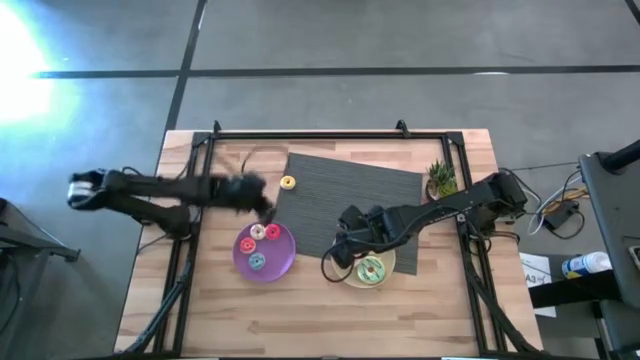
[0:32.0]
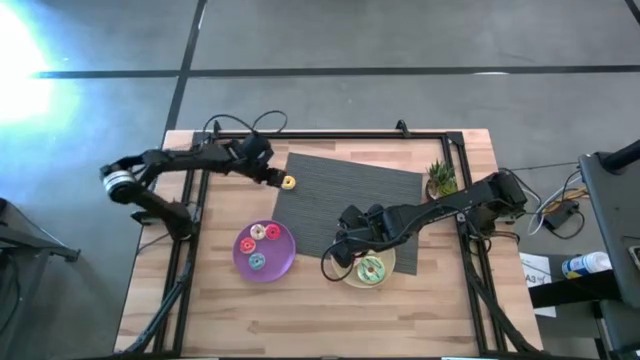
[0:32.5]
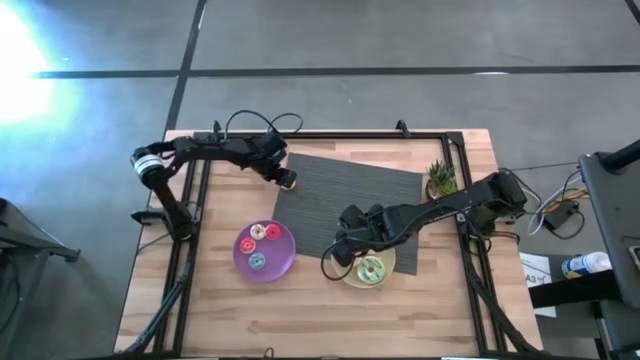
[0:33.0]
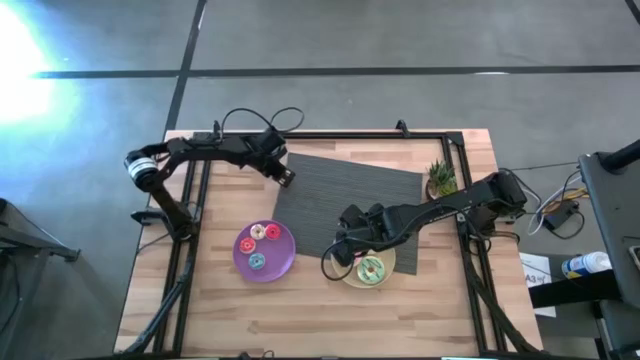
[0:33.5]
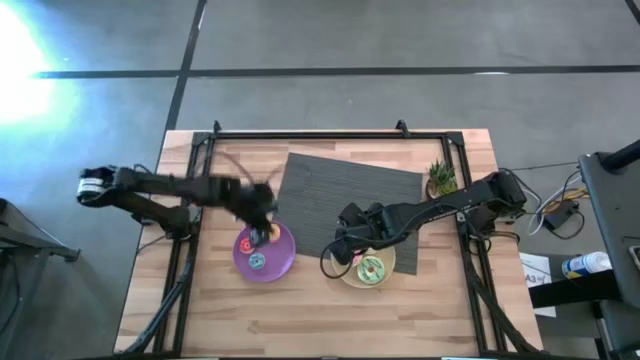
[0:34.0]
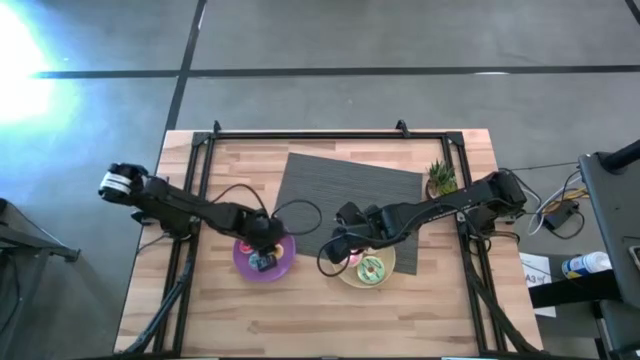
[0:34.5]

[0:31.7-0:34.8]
Task: Pick & Place donuts
Put the small yellow donut on the purple plate

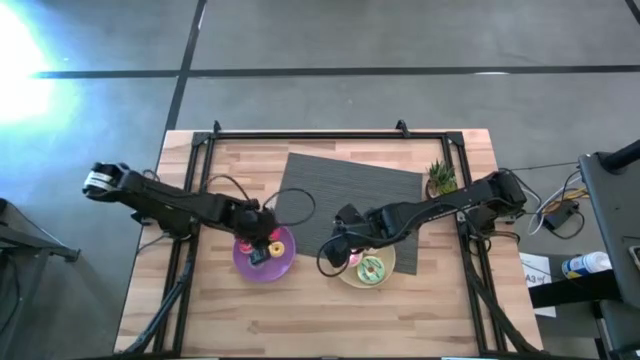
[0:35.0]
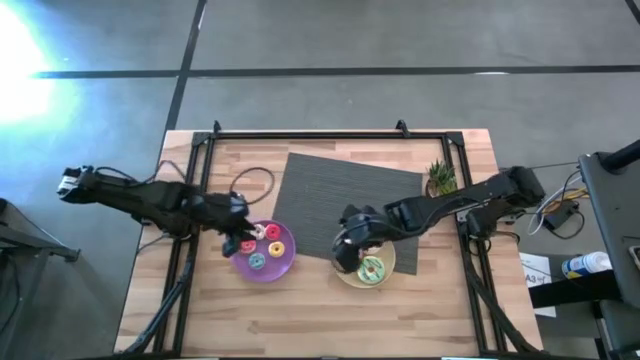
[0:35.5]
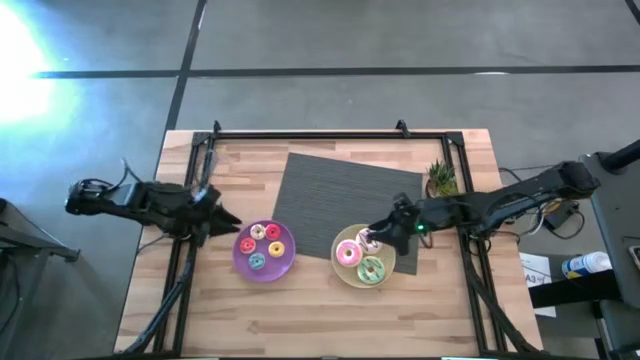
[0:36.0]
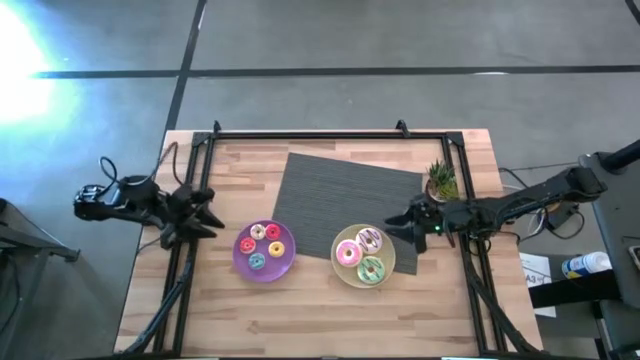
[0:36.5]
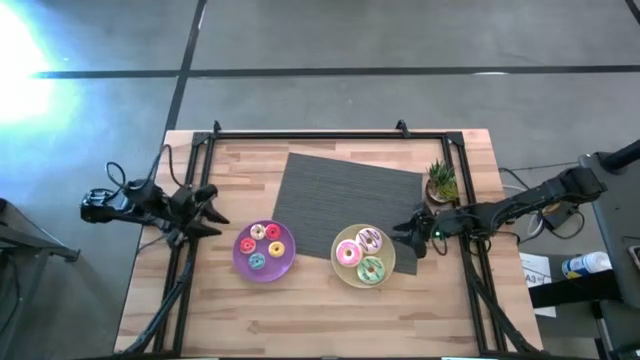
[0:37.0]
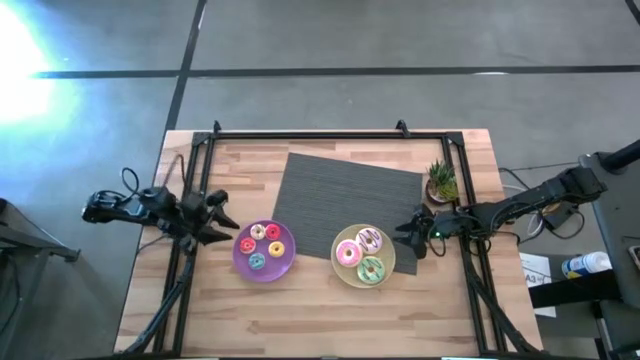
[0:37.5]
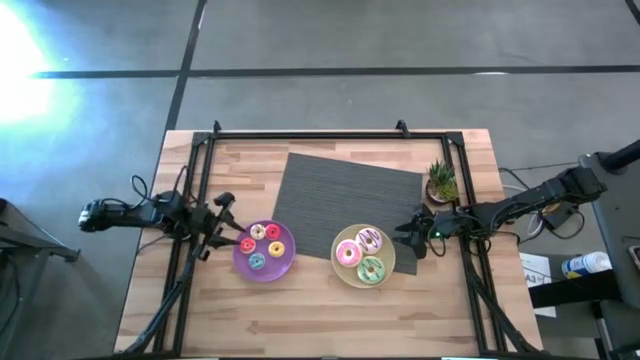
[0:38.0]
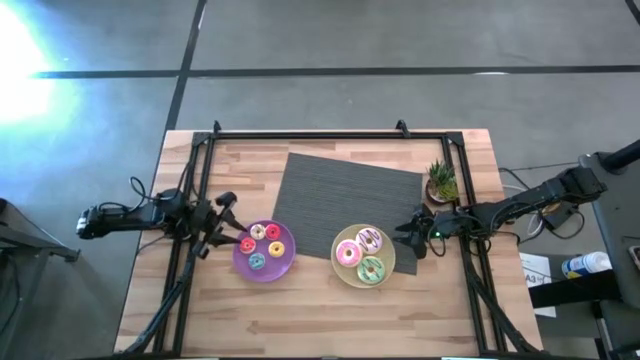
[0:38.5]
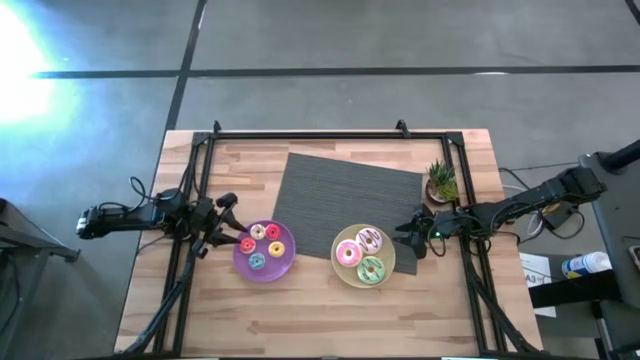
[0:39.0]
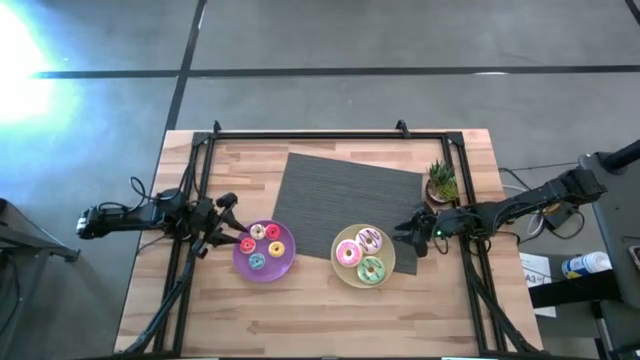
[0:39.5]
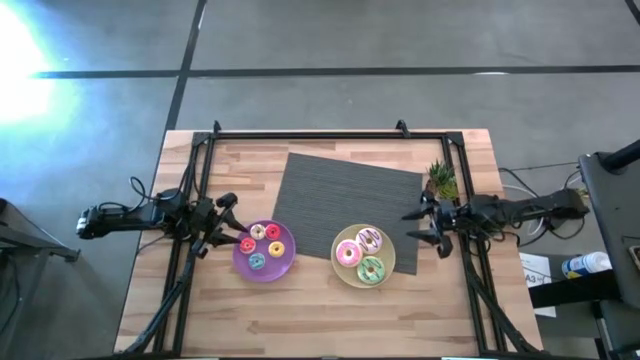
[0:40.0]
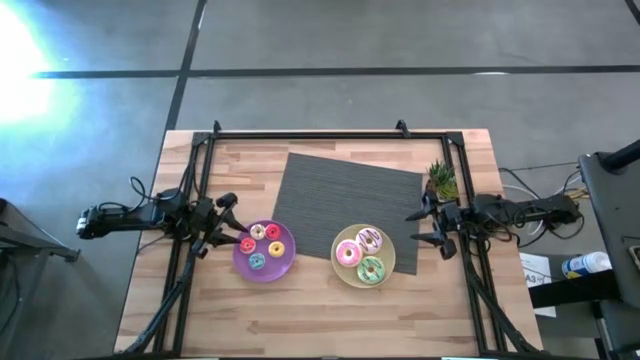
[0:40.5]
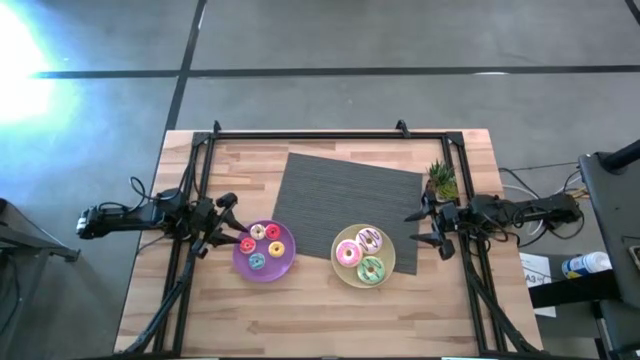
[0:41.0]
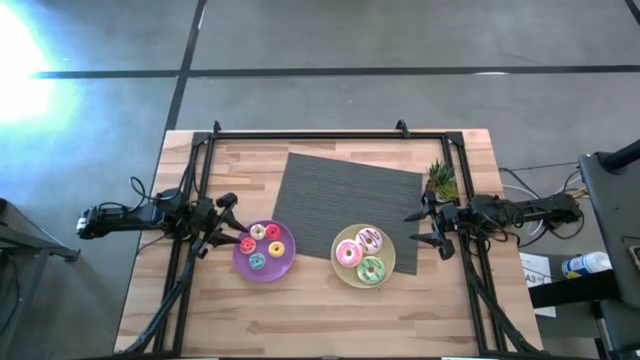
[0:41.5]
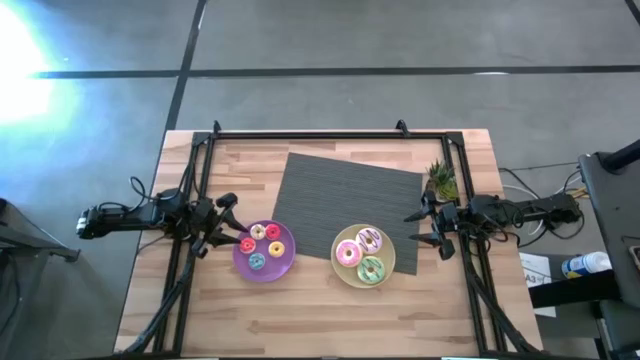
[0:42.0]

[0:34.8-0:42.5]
Return to Home Position

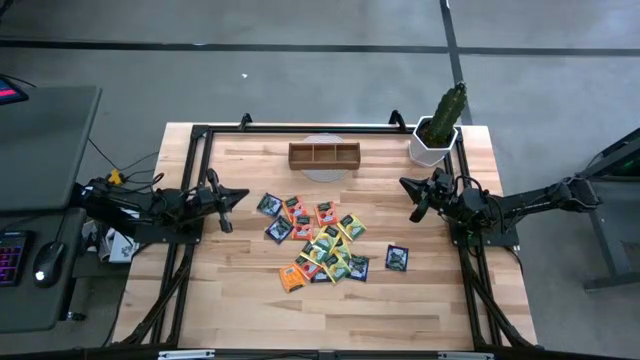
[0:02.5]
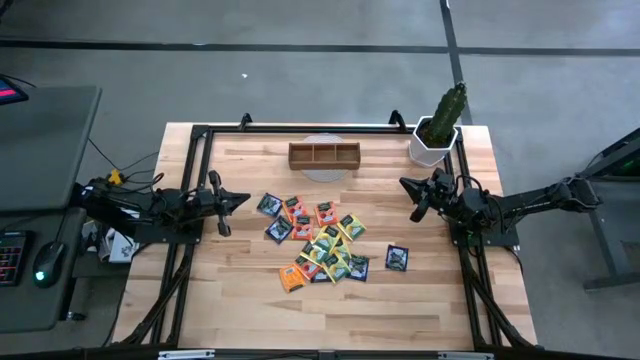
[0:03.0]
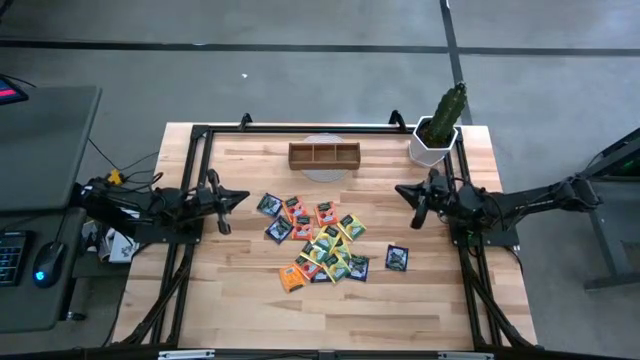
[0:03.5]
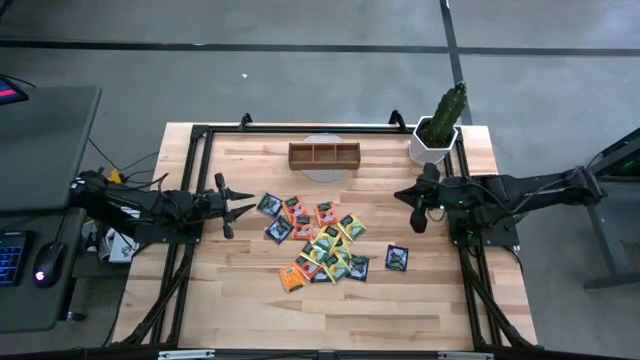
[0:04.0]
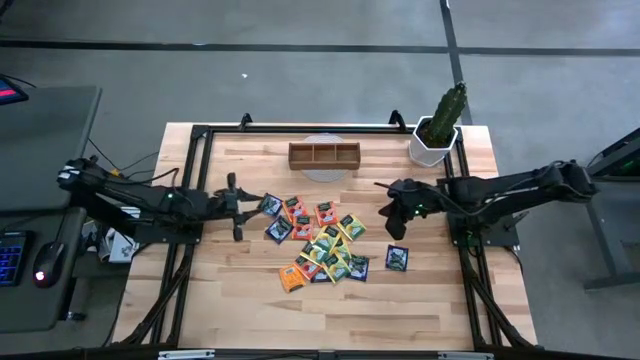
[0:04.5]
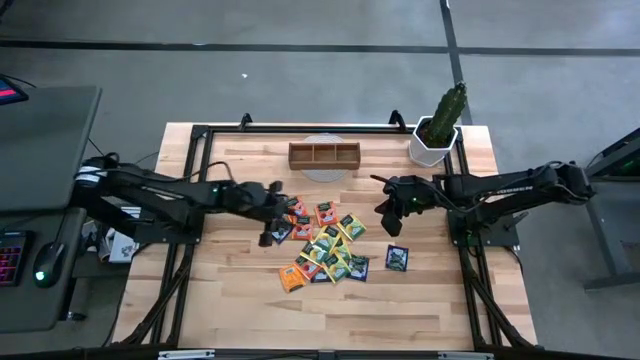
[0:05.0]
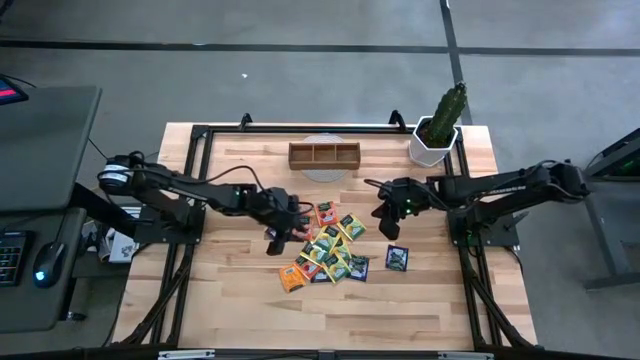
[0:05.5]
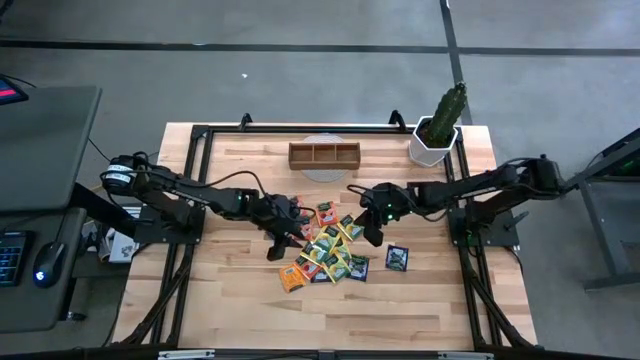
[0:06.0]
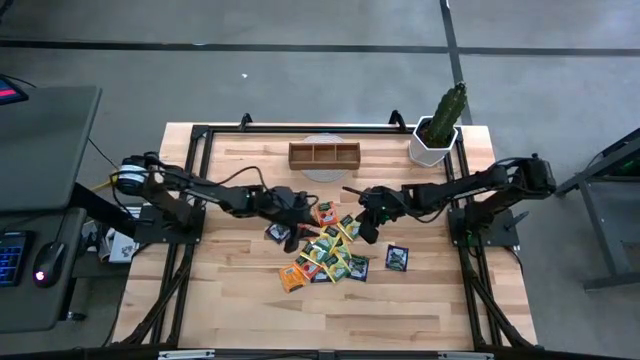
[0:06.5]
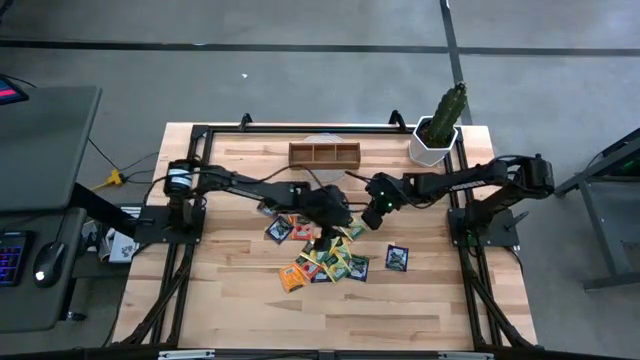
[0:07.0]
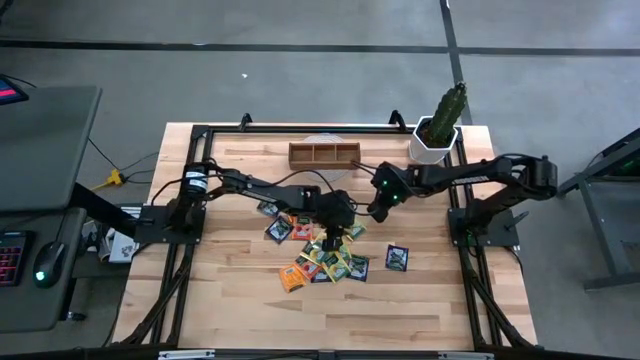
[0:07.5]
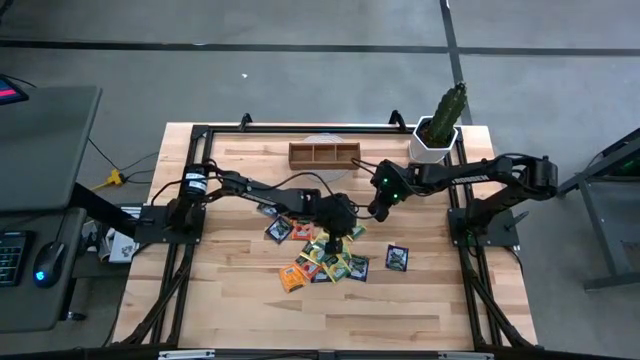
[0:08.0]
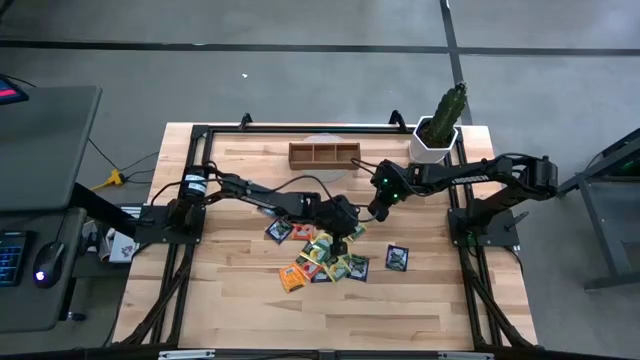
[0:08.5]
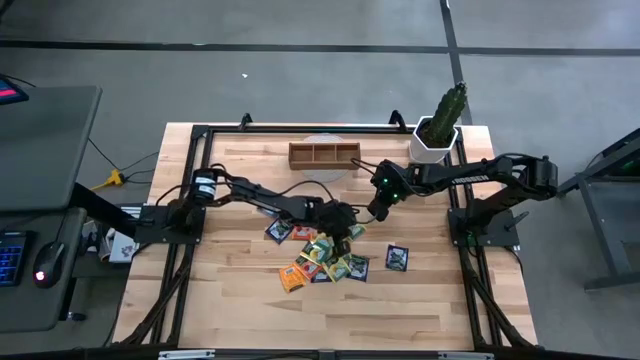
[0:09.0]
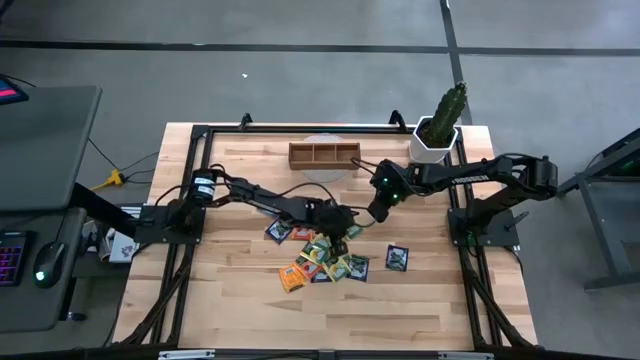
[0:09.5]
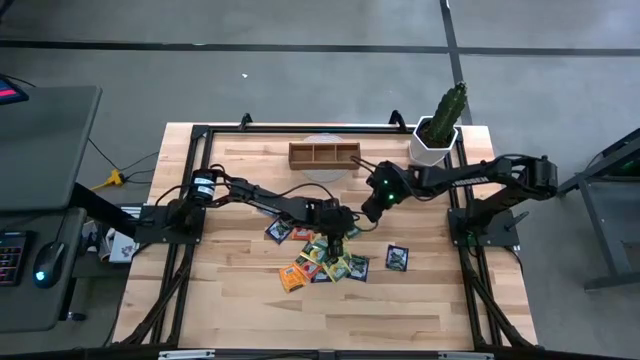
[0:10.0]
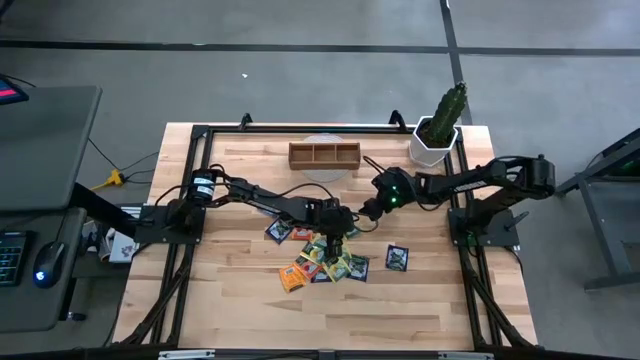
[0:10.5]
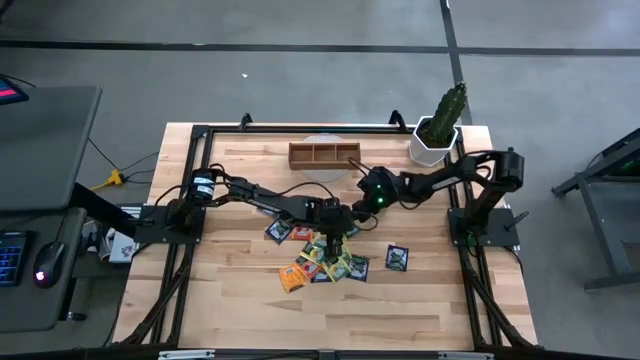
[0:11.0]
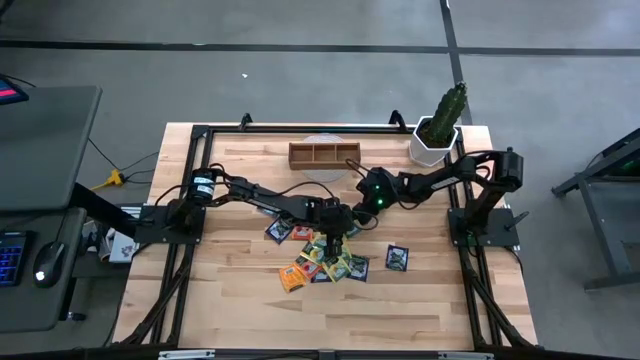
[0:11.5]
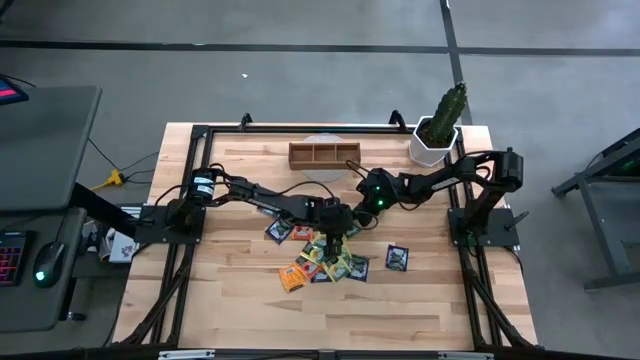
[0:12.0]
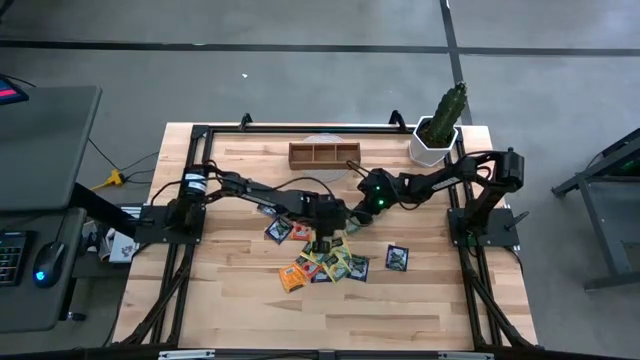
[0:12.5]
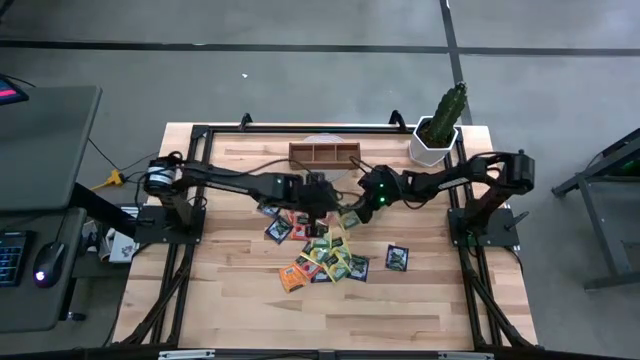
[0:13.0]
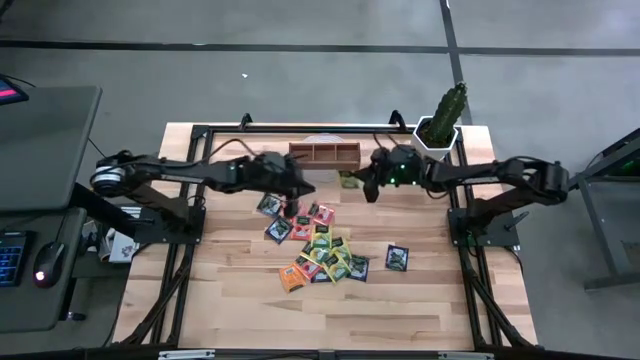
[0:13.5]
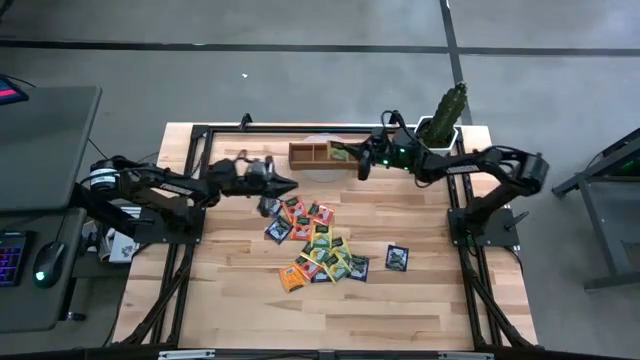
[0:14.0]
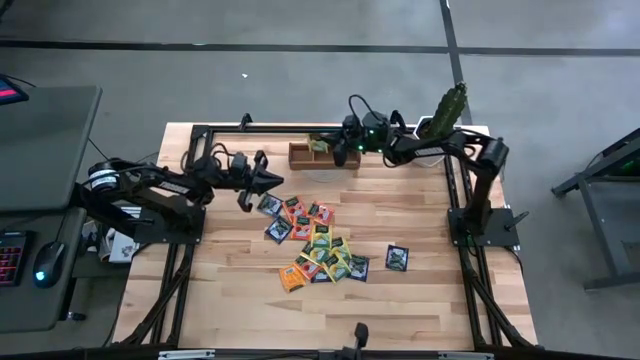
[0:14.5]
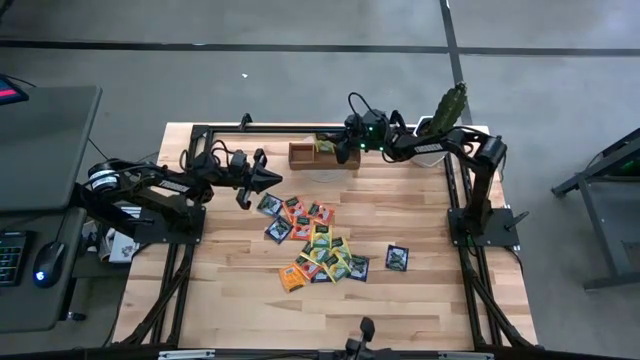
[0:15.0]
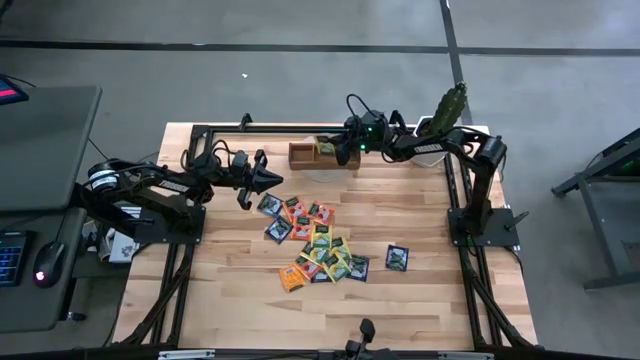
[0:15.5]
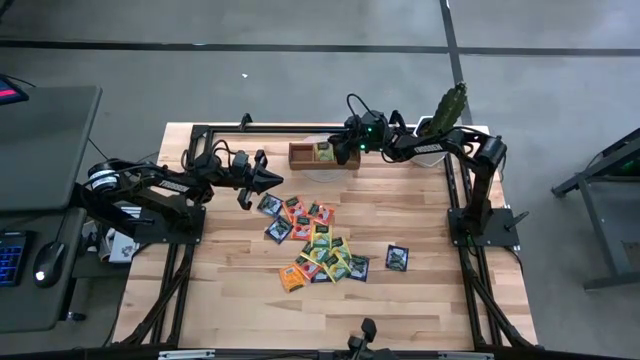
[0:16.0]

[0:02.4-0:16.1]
Task: Pick & Place Tea
Put the yellow tea sachet in the center of the organizer
